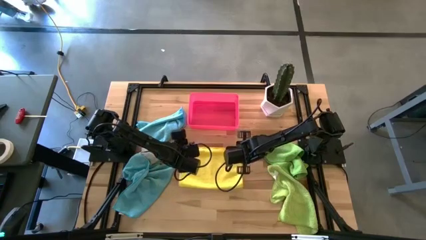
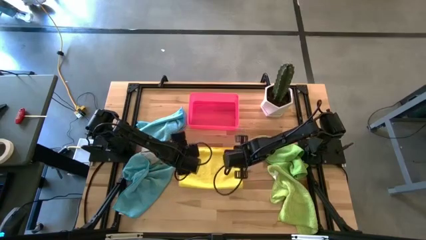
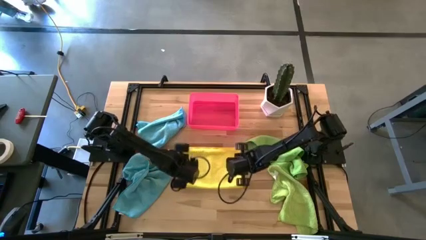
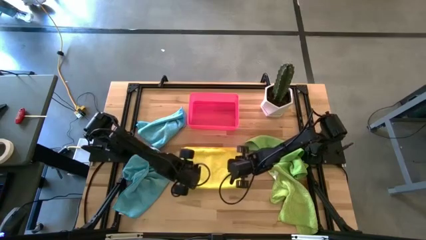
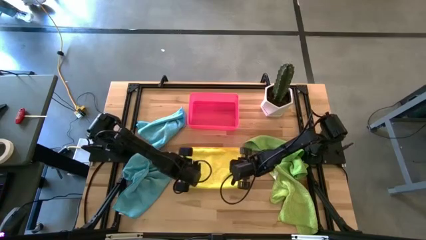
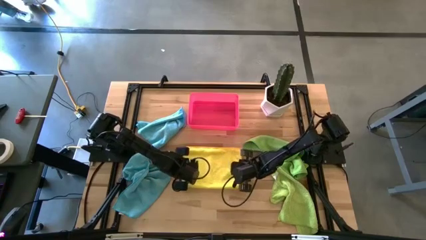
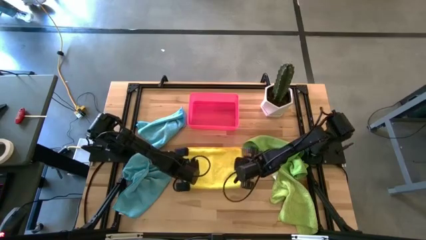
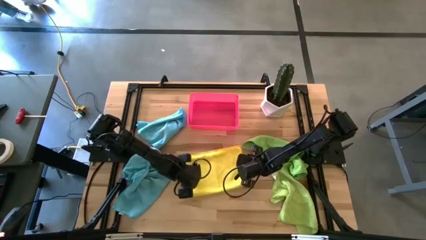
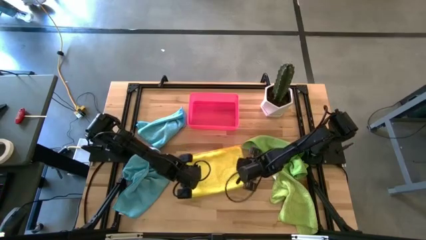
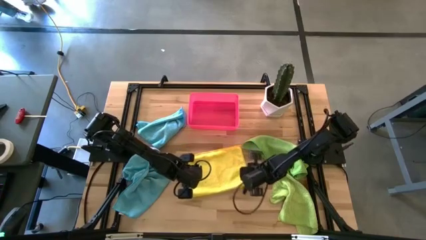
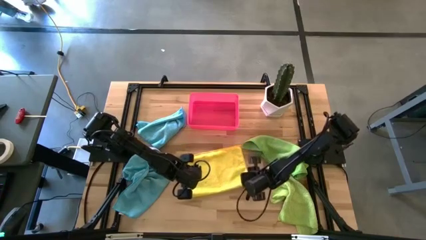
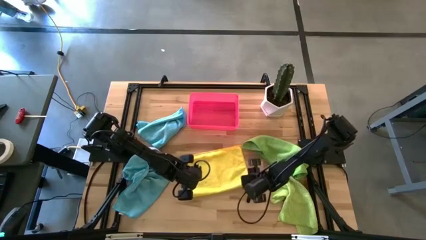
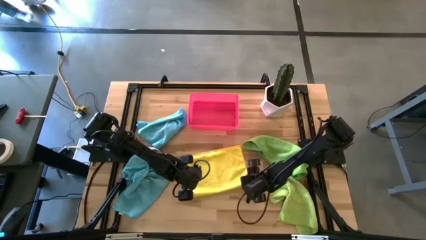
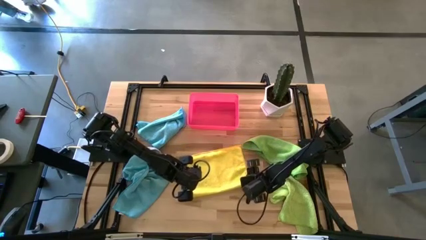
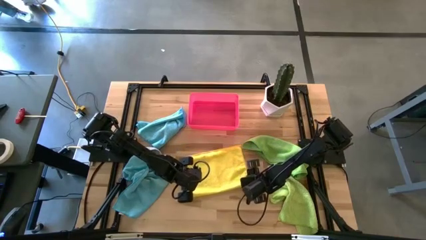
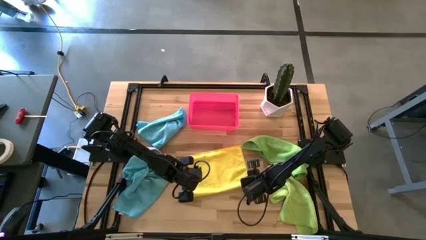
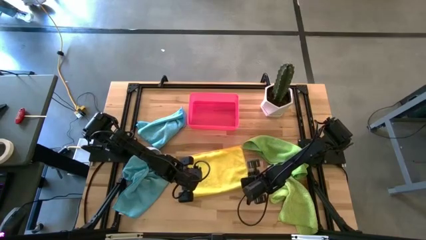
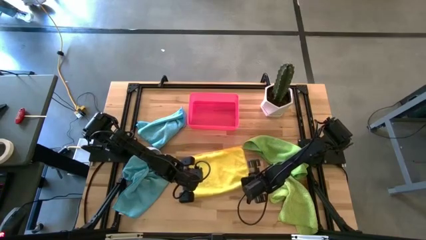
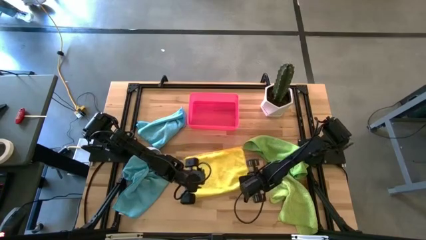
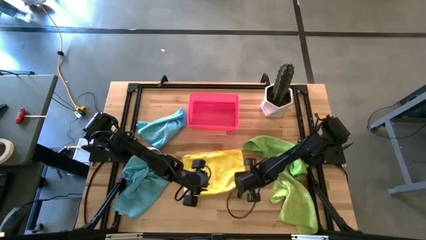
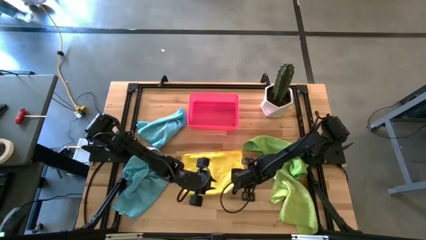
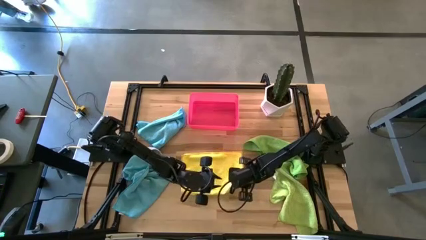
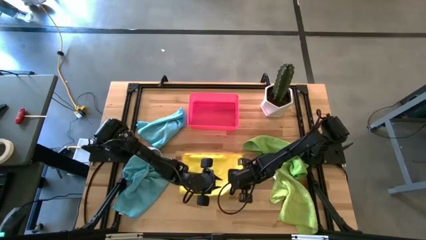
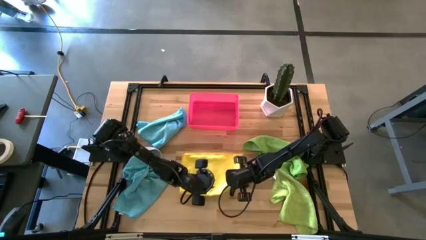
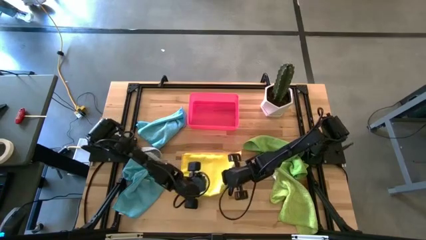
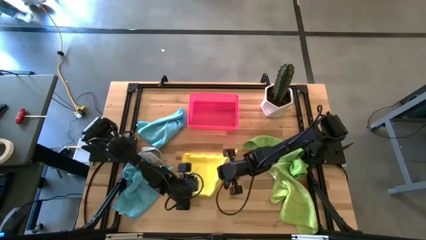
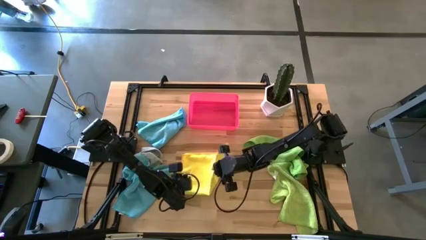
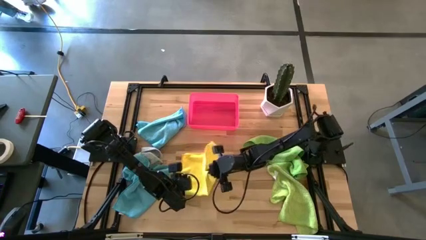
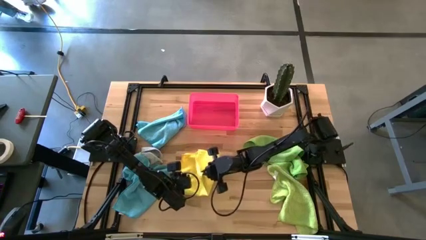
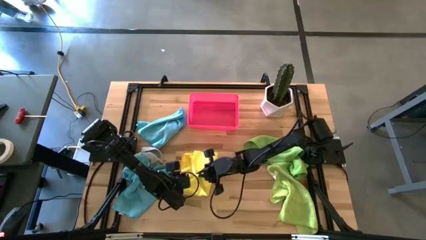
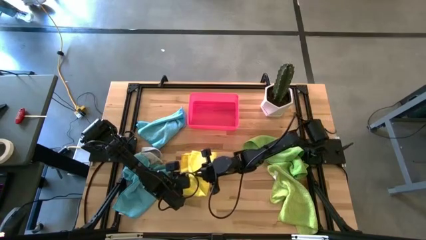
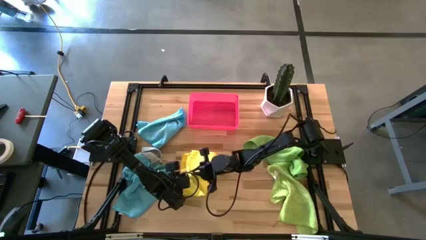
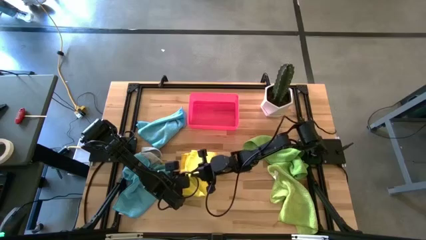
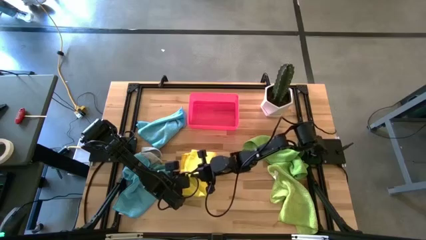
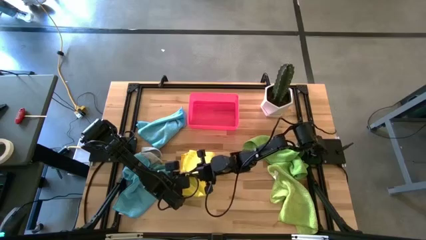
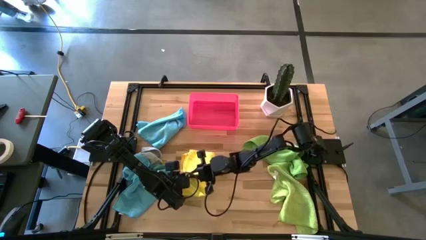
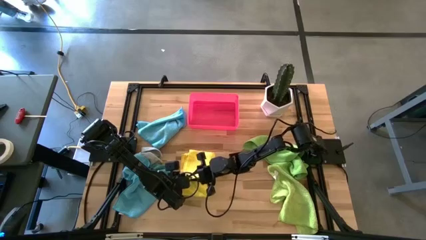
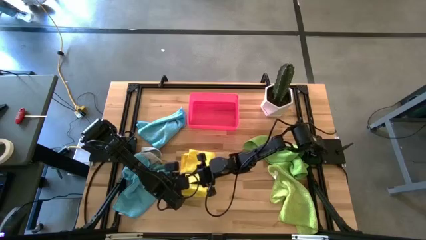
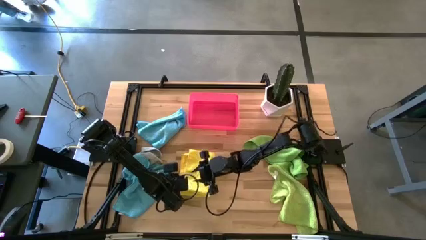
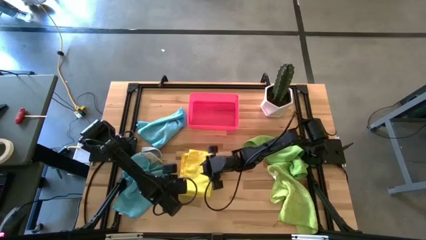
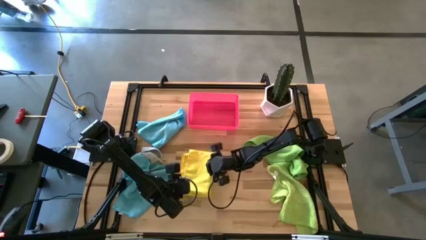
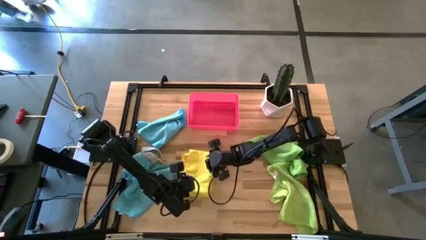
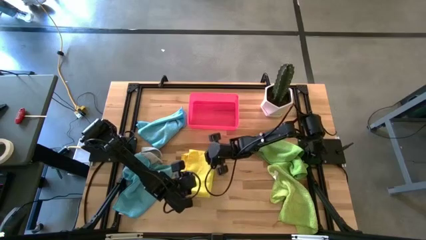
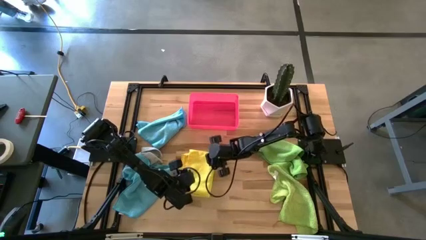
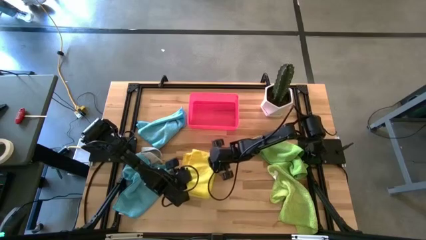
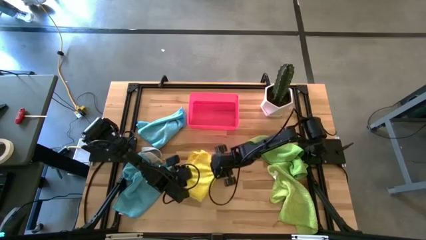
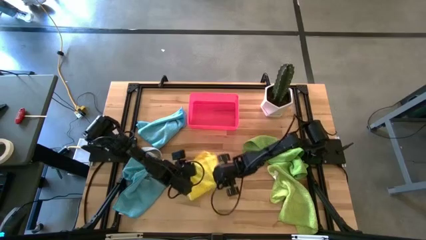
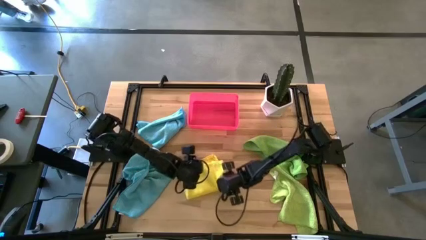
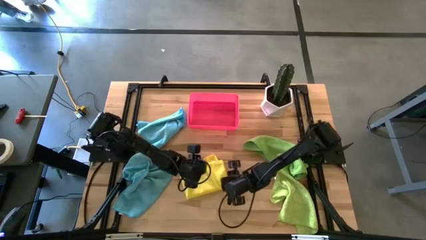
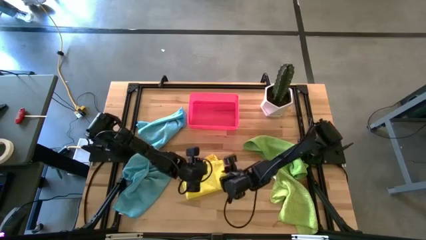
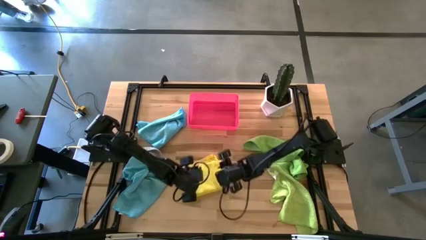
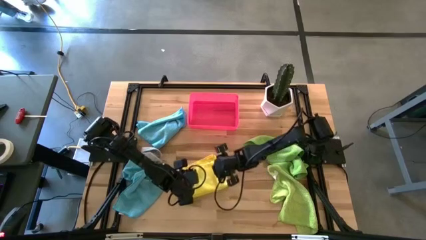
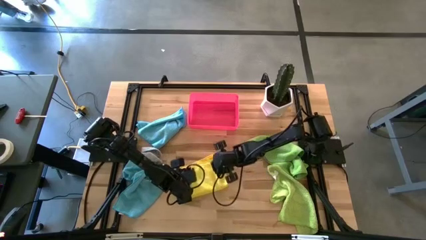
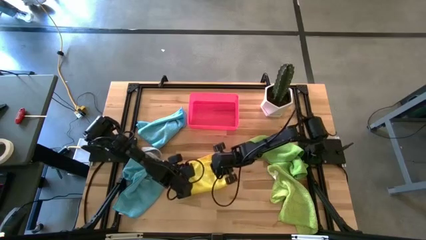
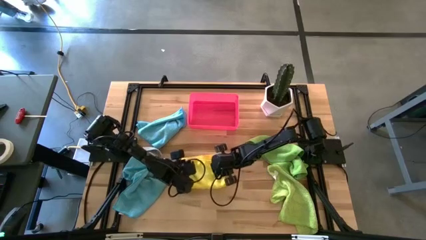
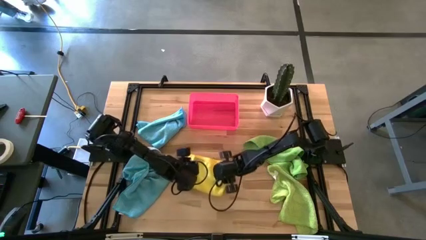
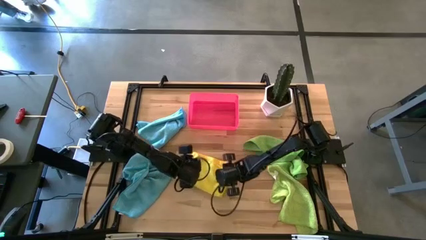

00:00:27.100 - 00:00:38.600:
Task: Fold microfiber towels
Fold the yellow microfiber cloth

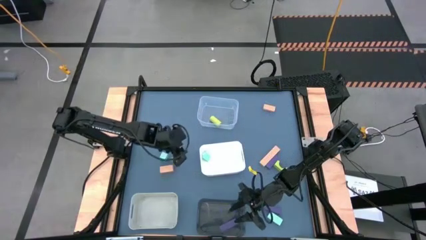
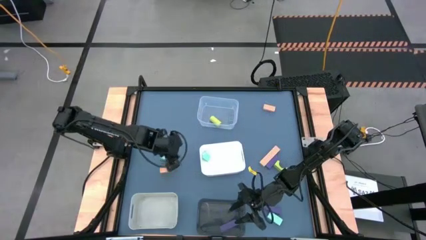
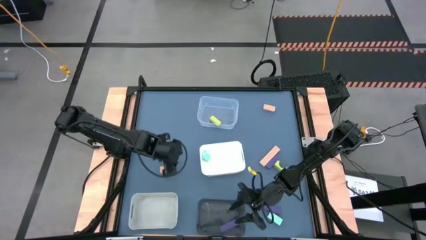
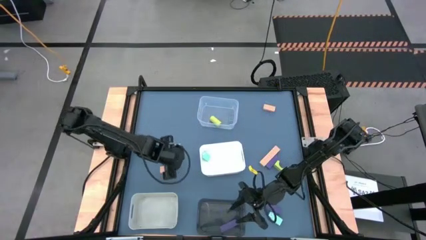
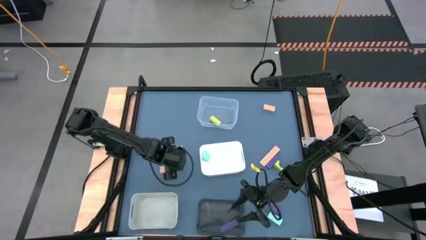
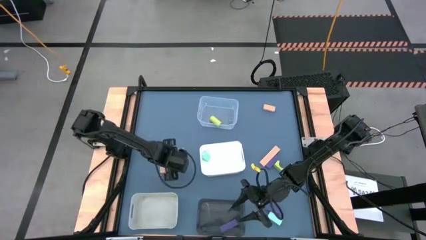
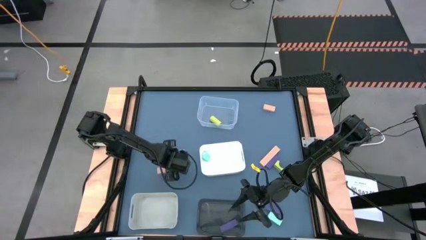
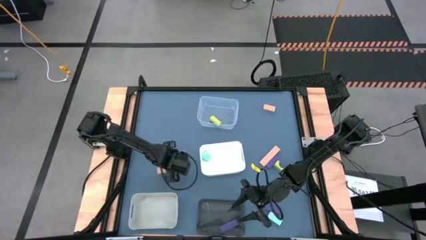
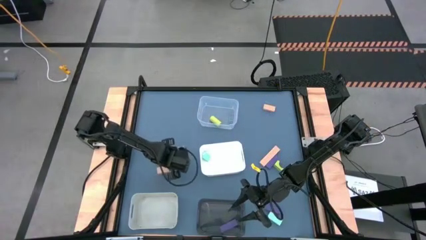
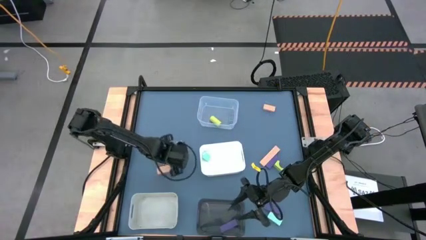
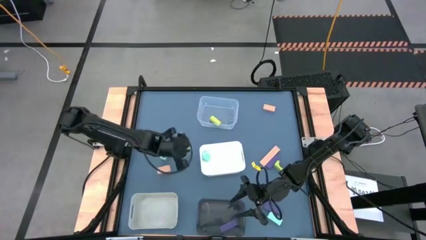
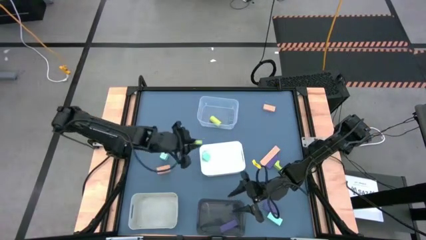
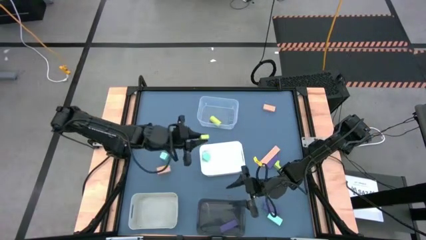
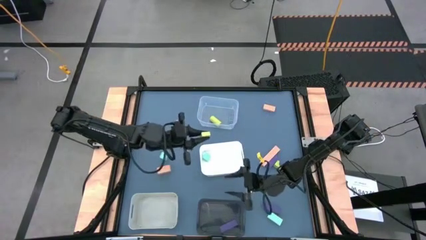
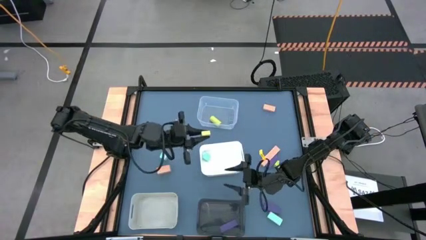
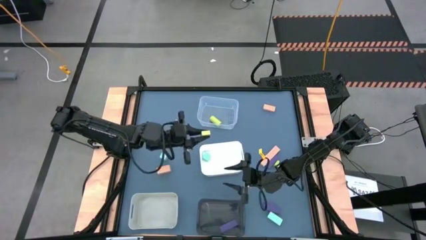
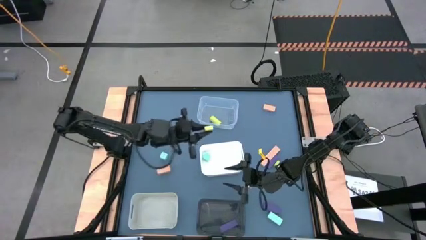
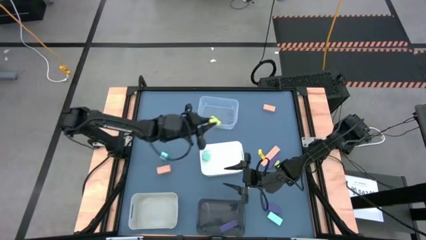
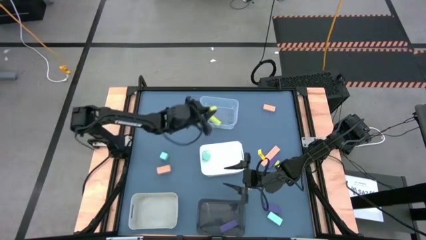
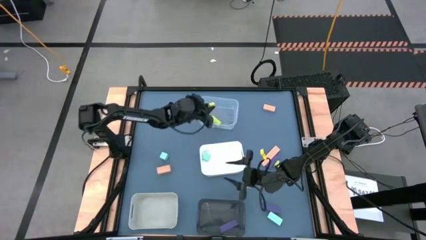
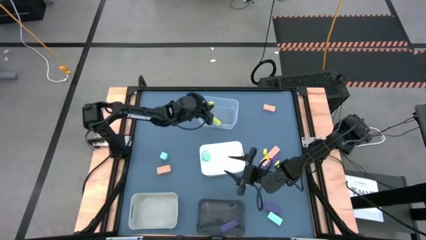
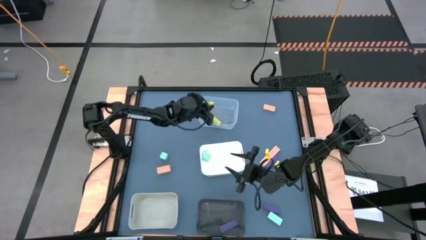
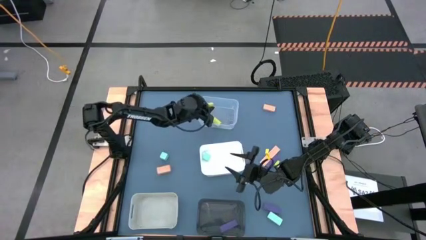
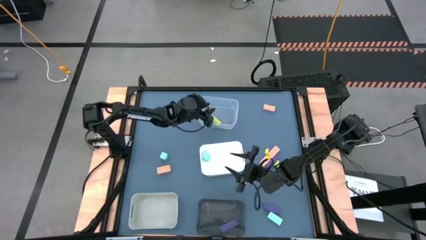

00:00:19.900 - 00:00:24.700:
Task: Sort & place blocks by color
Put the left green block into the transparent bin
